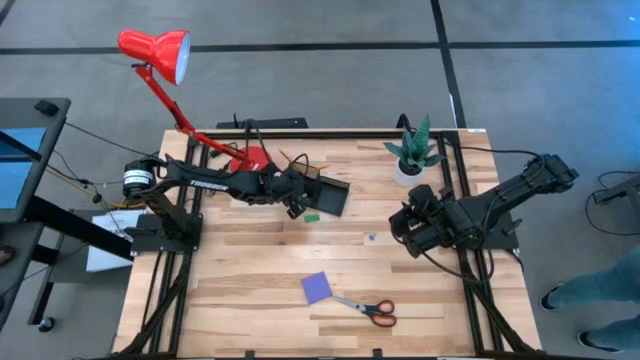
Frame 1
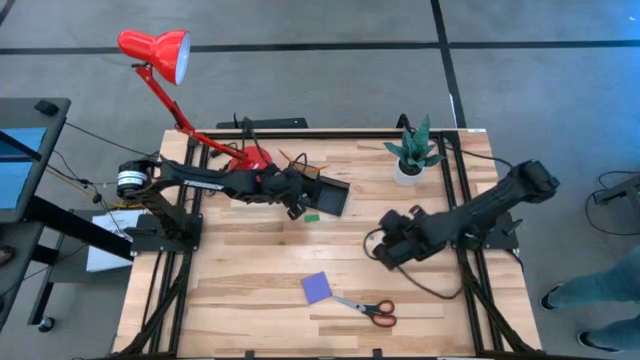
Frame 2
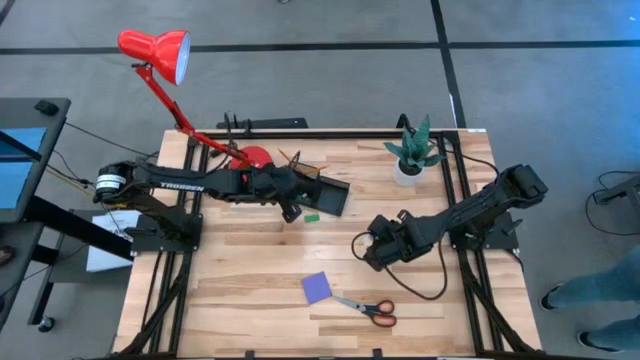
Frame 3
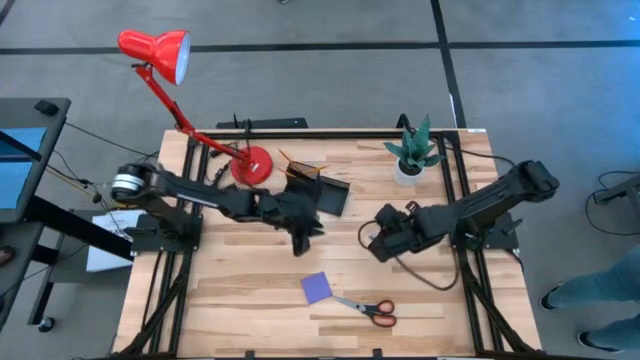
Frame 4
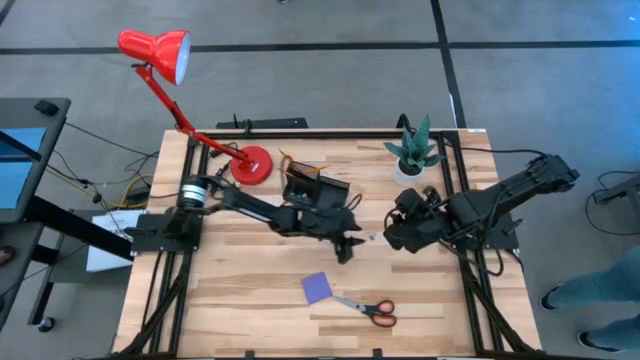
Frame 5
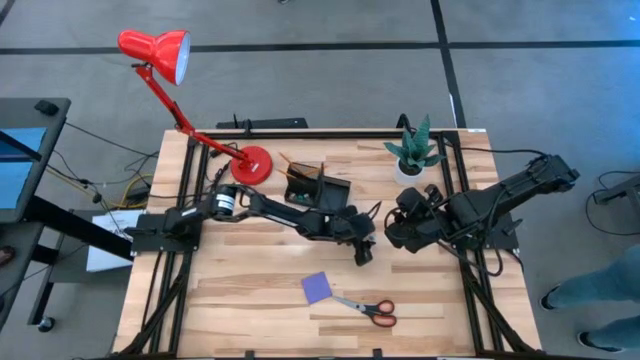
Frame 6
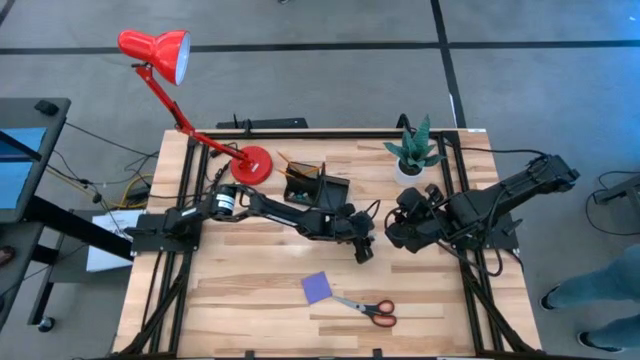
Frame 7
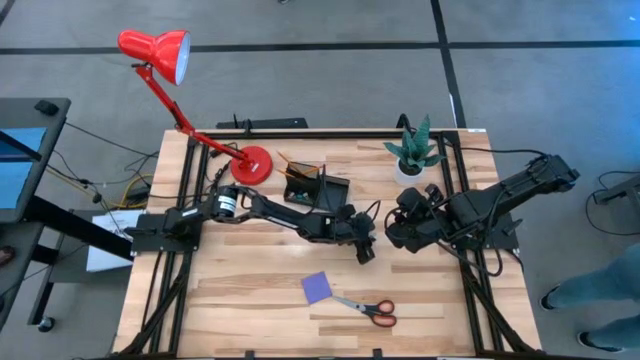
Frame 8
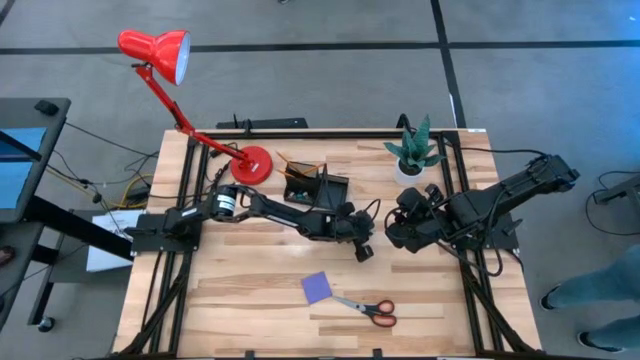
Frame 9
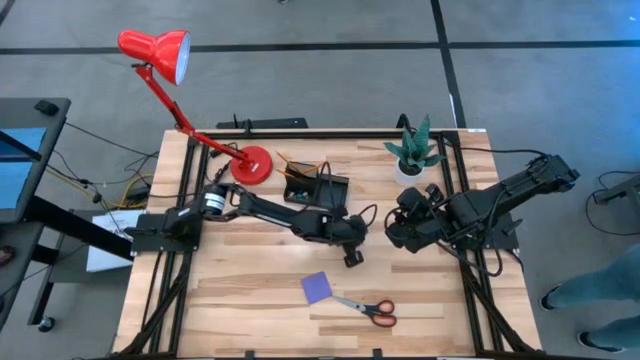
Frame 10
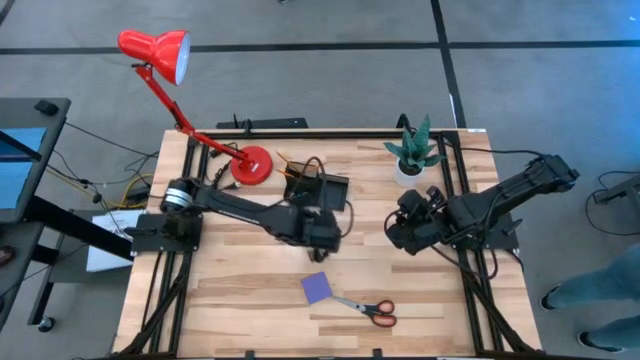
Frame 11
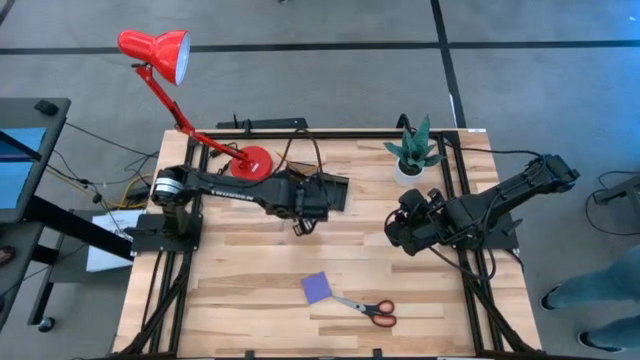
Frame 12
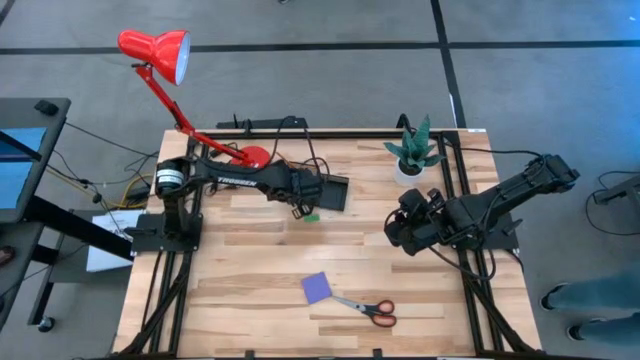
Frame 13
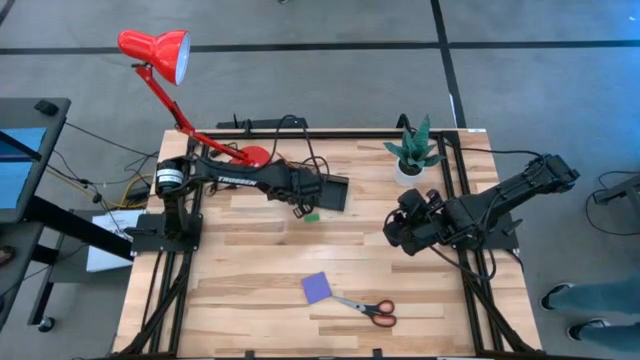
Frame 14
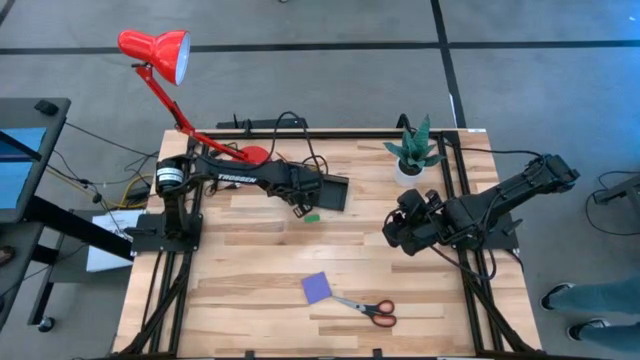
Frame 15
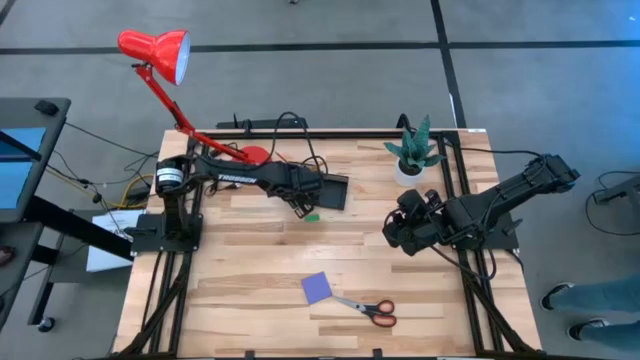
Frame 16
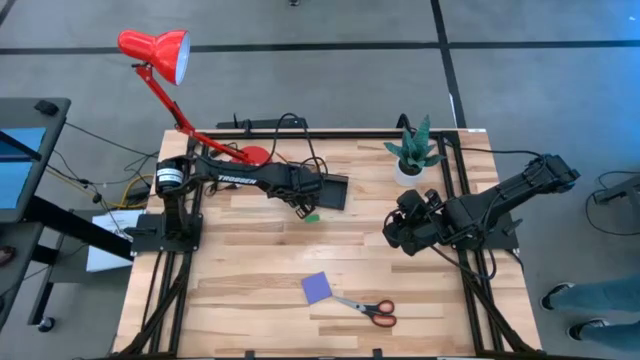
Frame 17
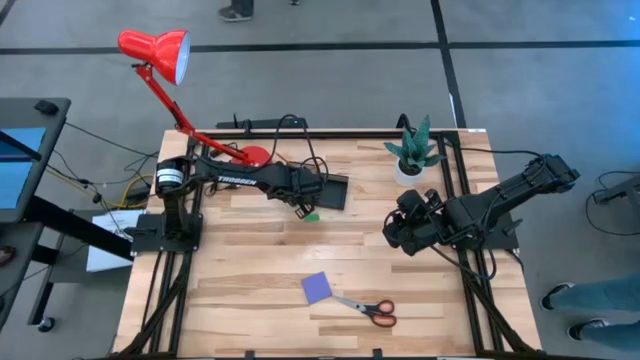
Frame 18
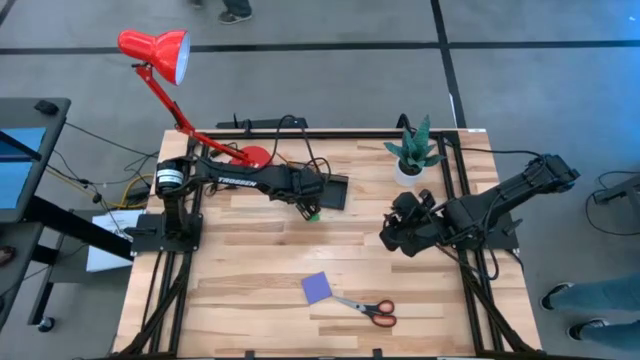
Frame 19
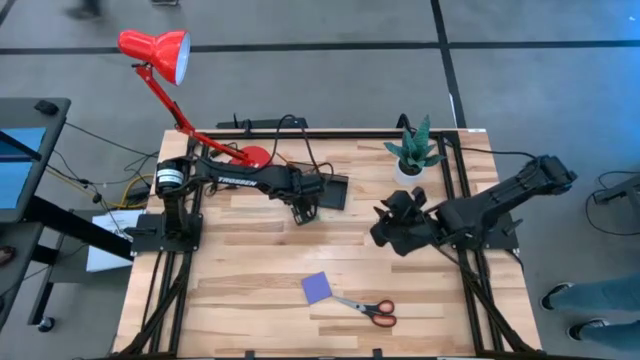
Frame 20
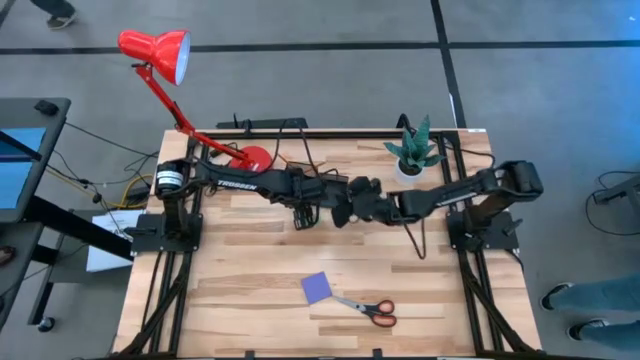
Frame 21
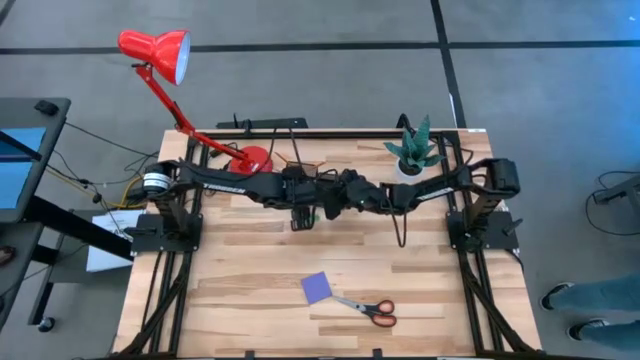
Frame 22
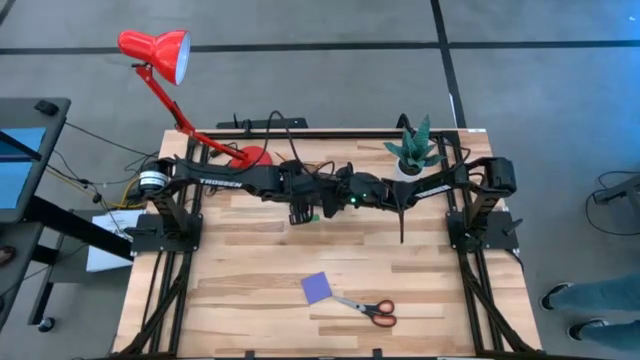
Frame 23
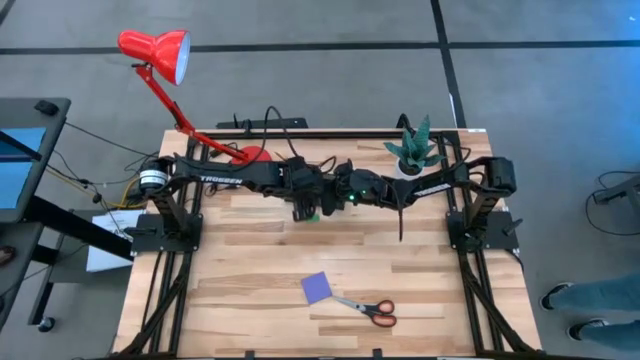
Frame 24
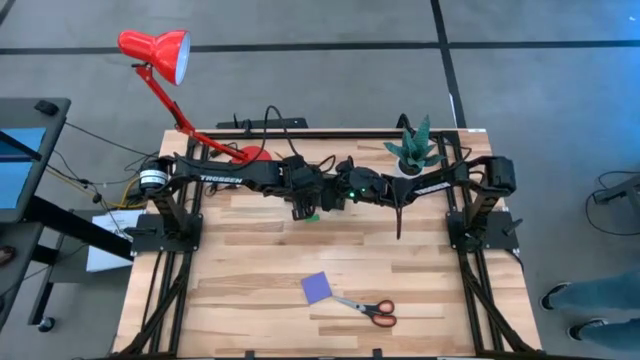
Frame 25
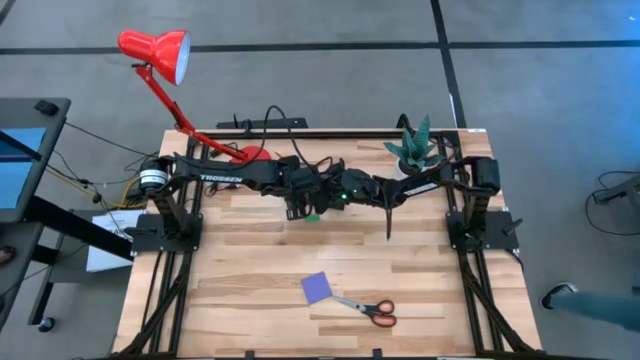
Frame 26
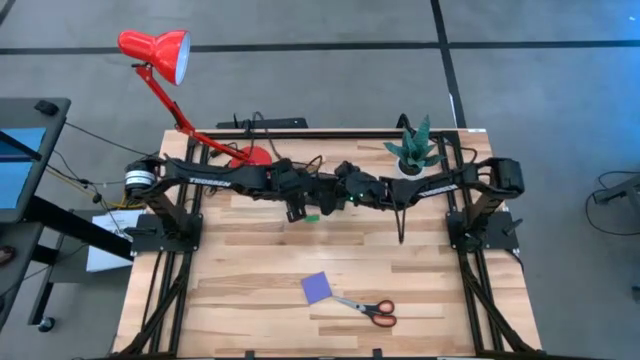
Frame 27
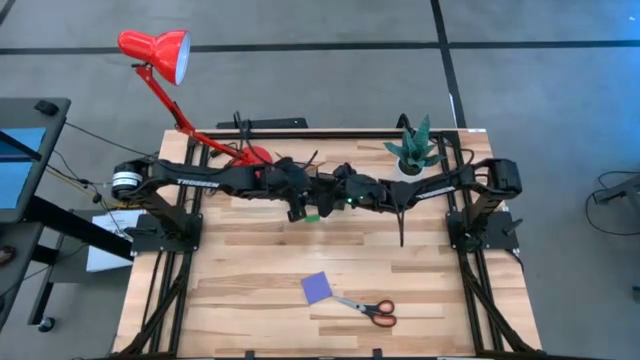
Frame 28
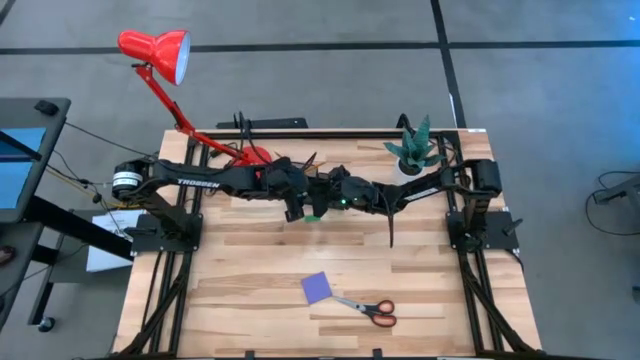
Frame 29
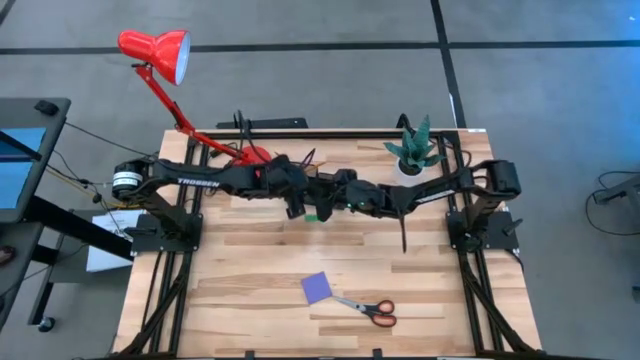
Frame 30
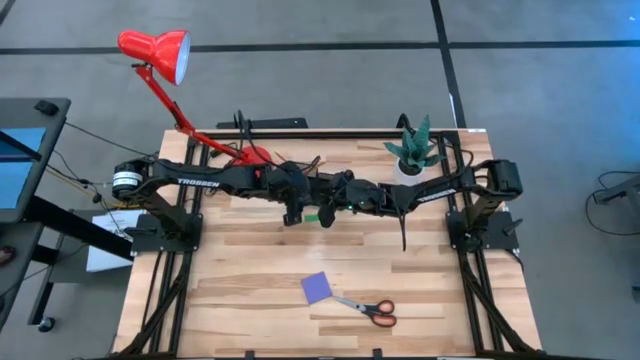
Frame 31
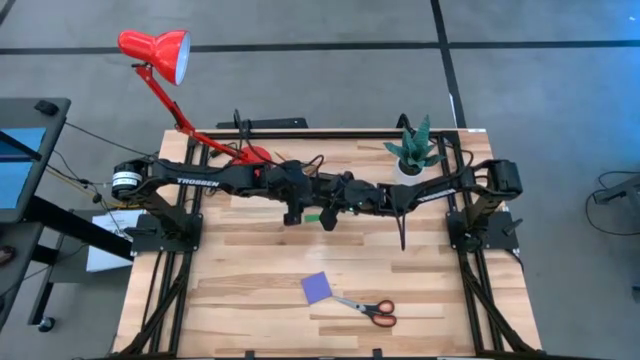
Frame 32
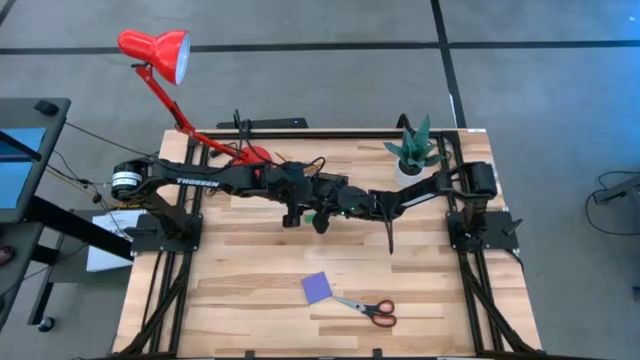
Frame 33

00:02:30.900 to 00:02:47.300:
Task: Pick and place office supplies into organizer
Put the blue binder clip into the black desk organizer

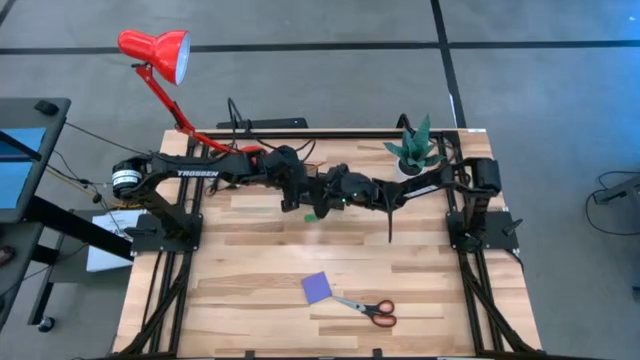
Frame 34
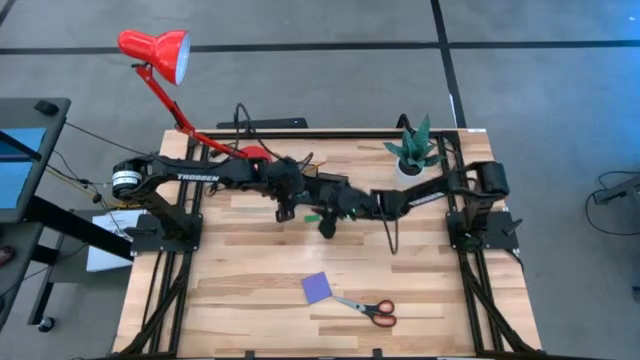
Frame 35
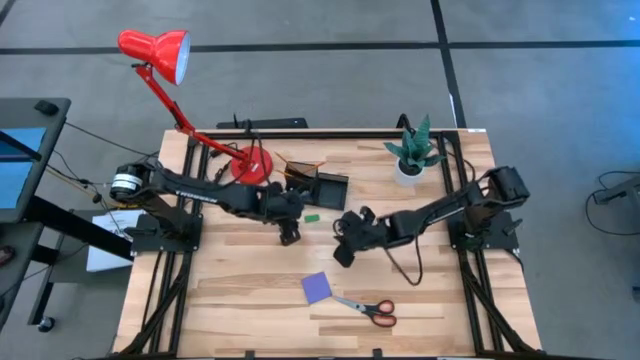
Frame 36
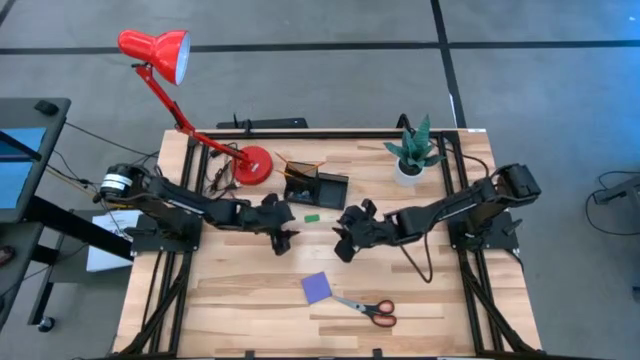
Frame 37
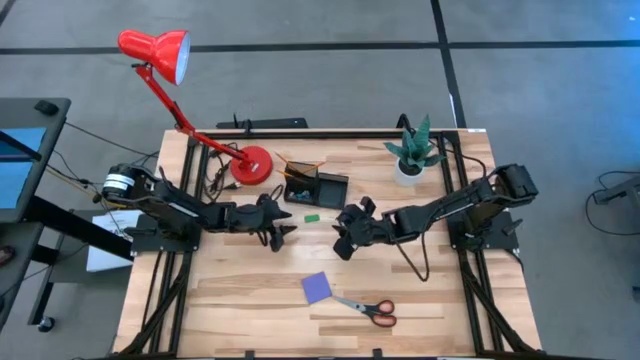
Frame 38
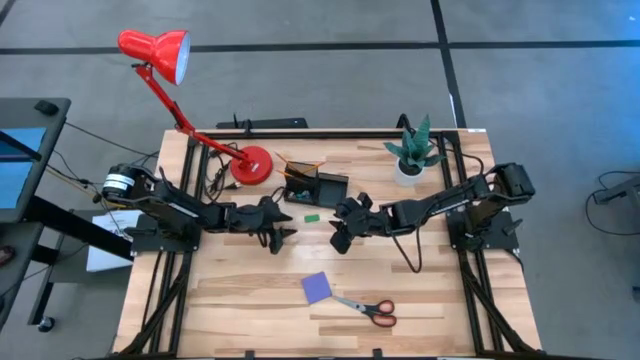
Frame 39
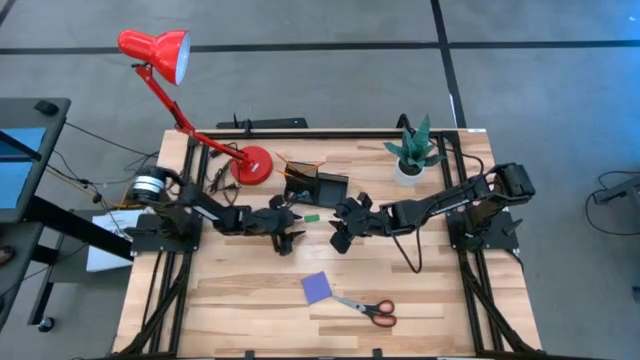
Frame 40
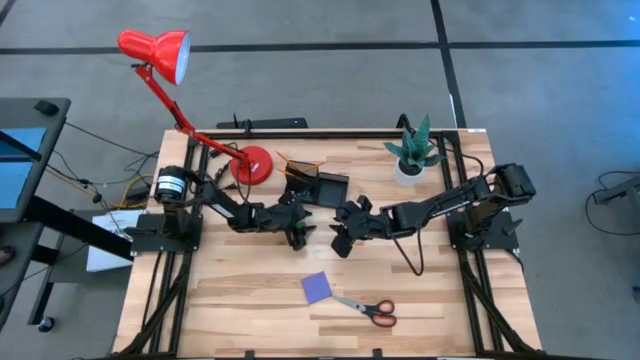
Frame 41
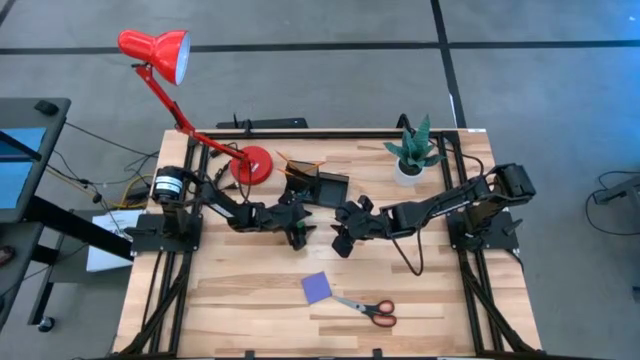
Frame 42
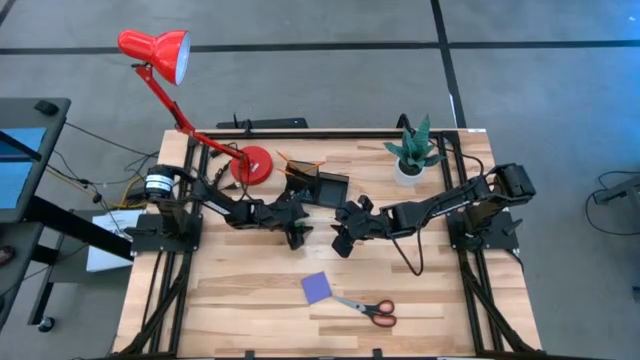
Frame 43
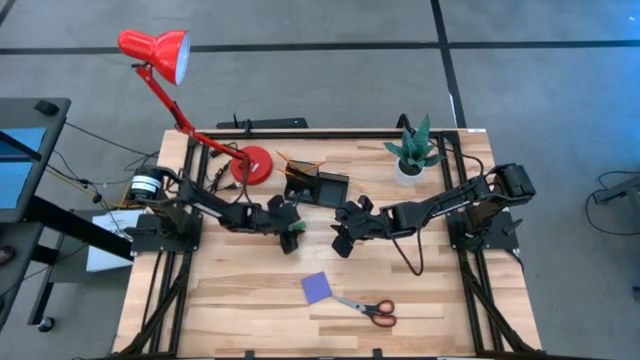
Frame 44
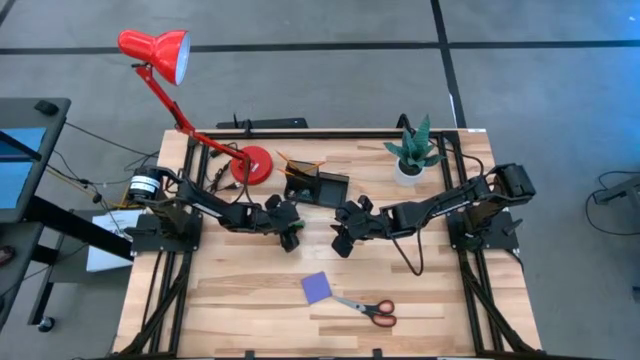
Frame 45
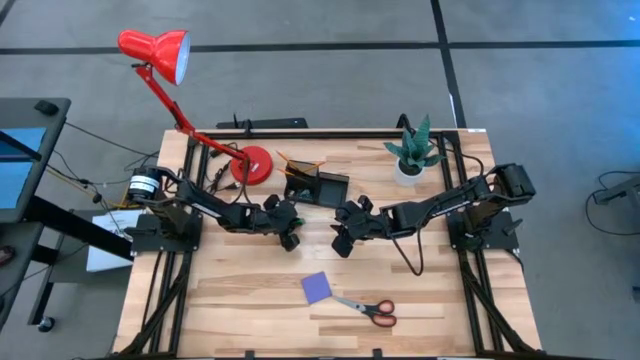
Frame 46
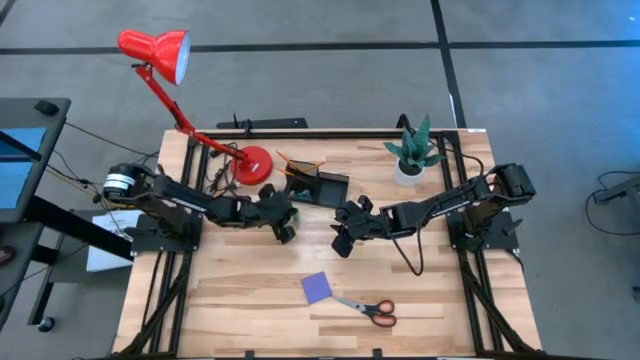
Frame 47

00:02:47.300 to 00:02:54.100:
Put the green eraser into the black desk organizer
